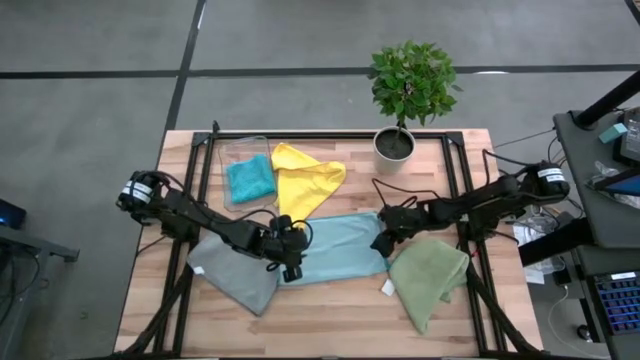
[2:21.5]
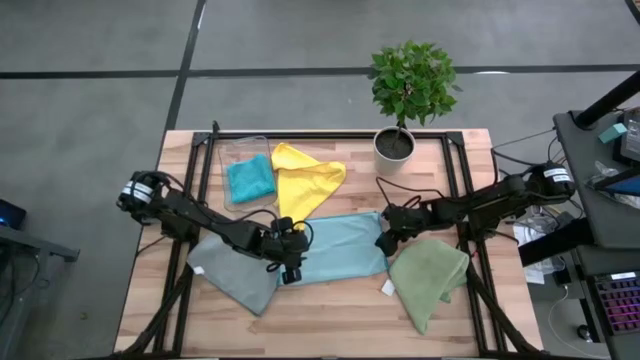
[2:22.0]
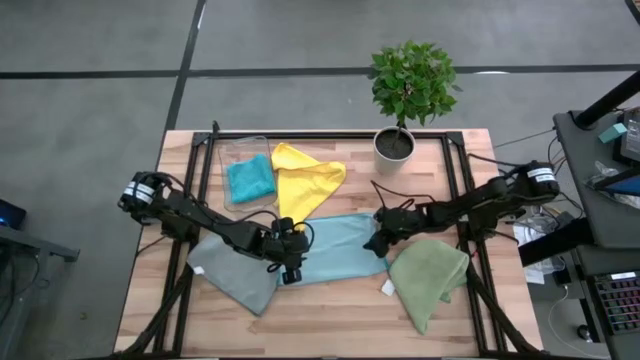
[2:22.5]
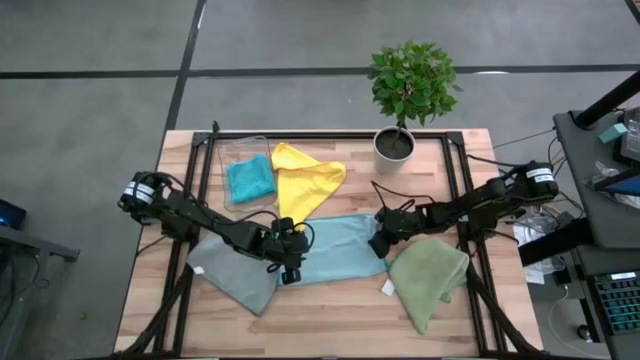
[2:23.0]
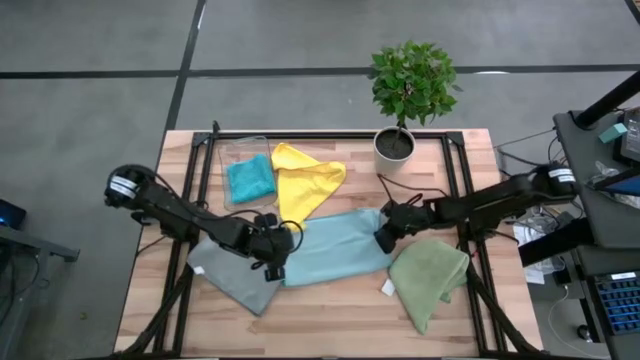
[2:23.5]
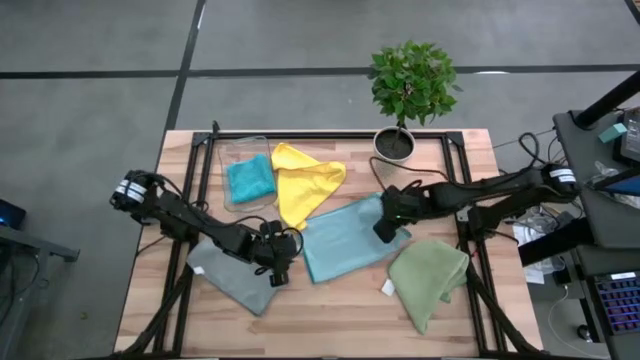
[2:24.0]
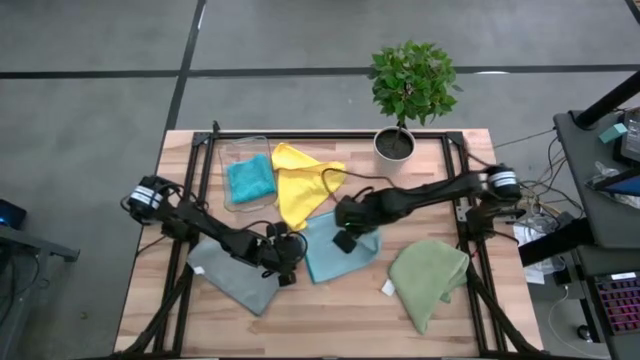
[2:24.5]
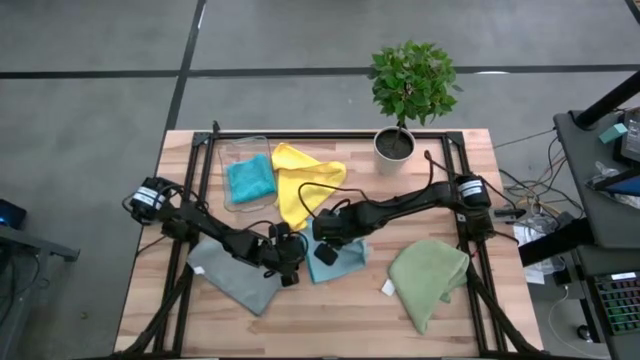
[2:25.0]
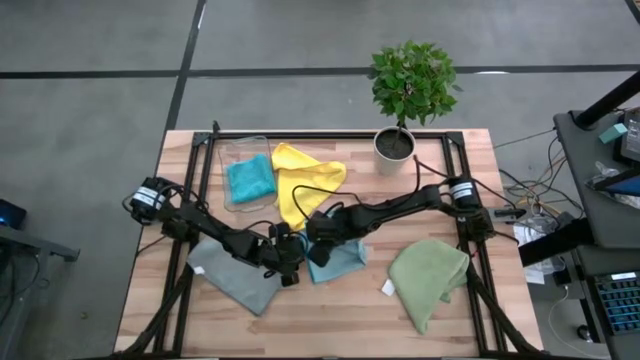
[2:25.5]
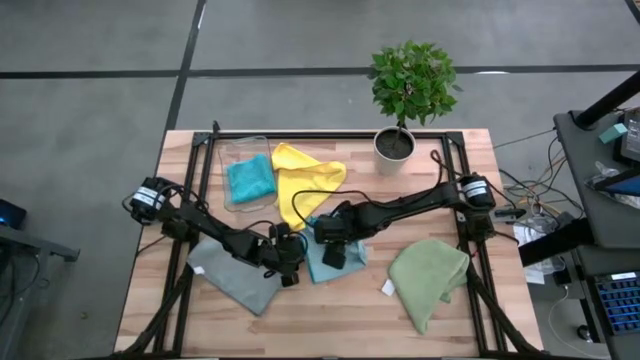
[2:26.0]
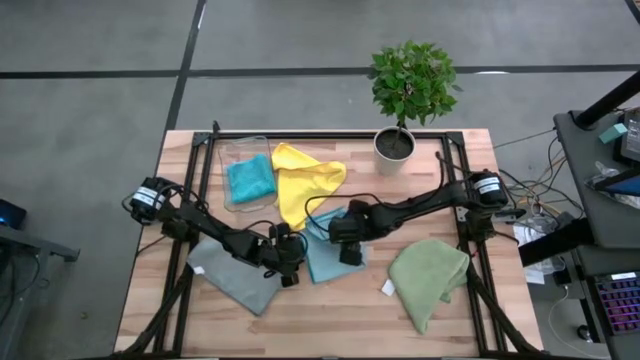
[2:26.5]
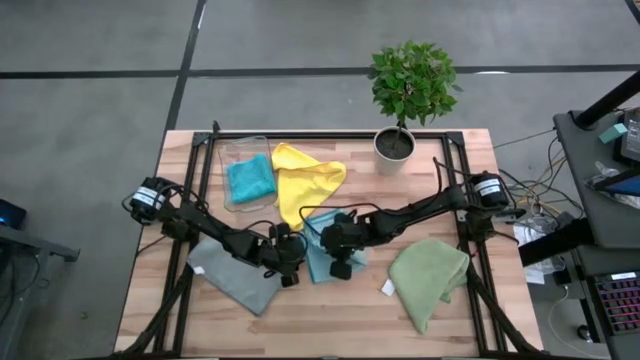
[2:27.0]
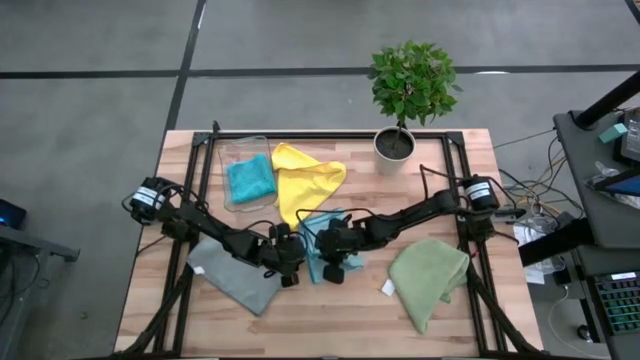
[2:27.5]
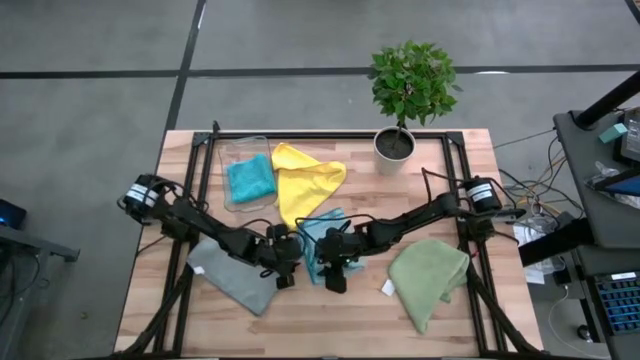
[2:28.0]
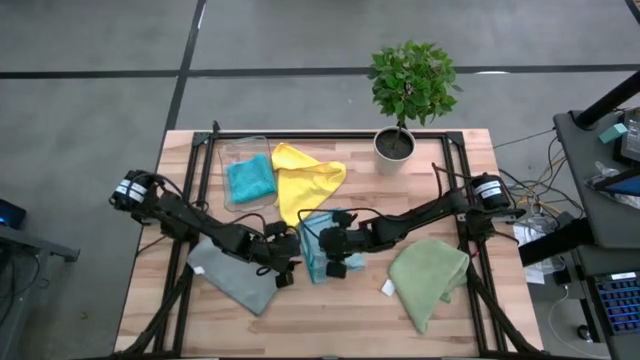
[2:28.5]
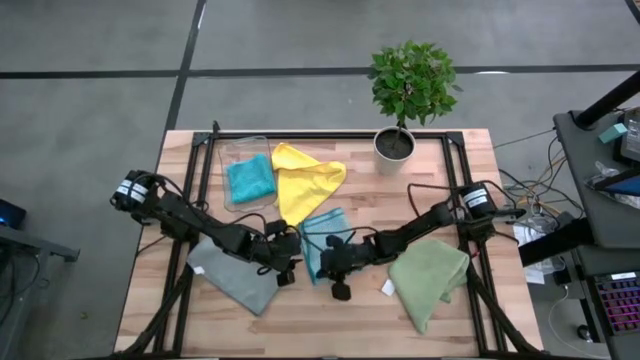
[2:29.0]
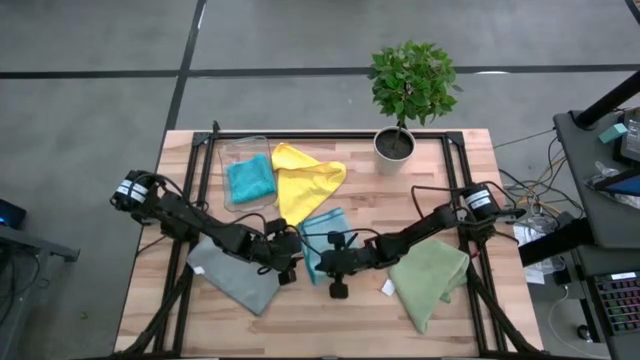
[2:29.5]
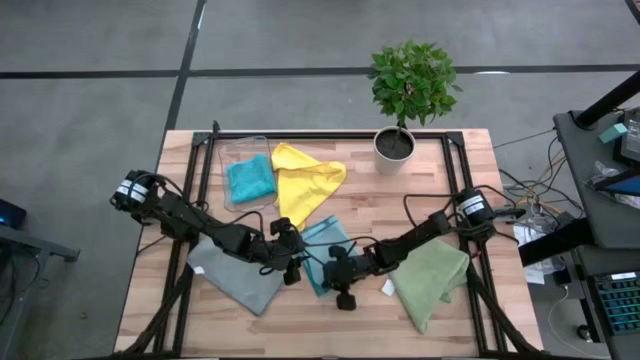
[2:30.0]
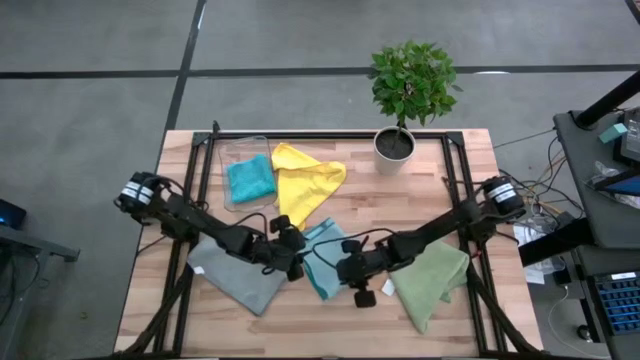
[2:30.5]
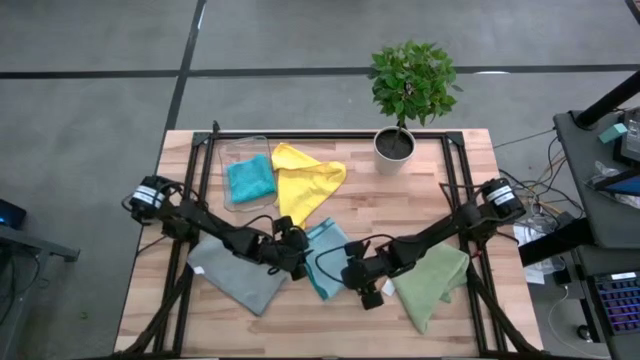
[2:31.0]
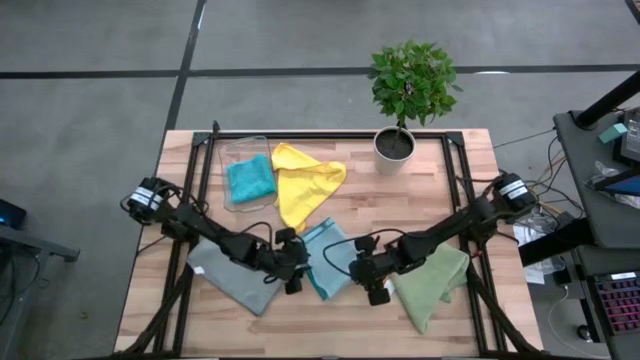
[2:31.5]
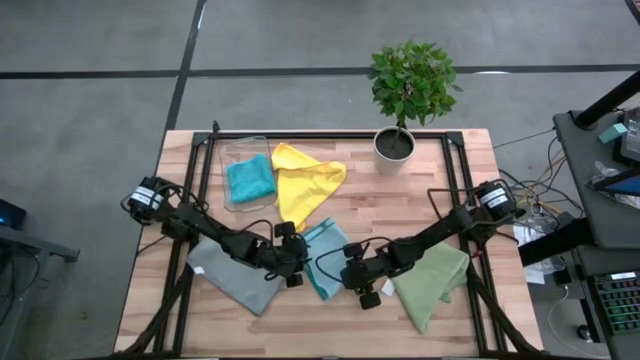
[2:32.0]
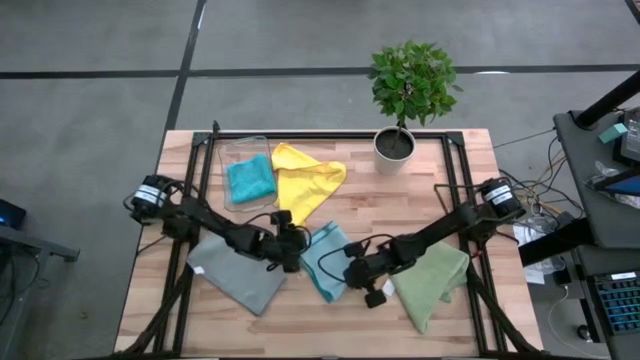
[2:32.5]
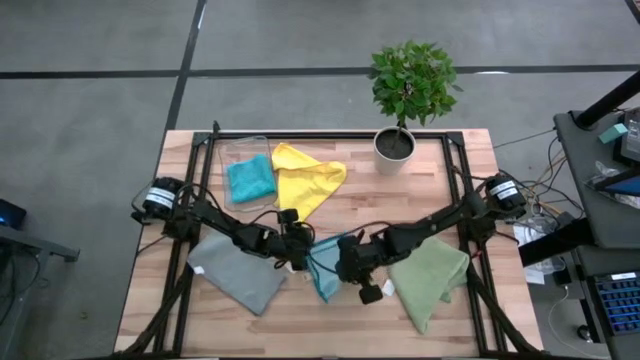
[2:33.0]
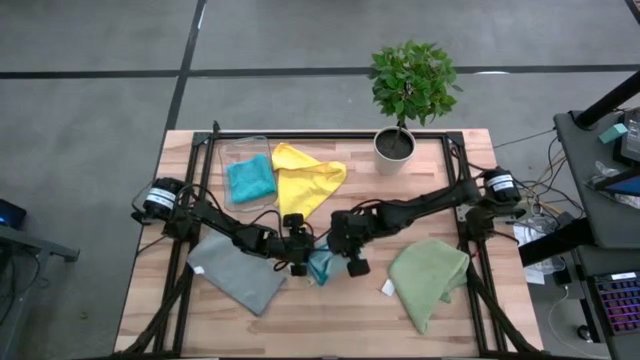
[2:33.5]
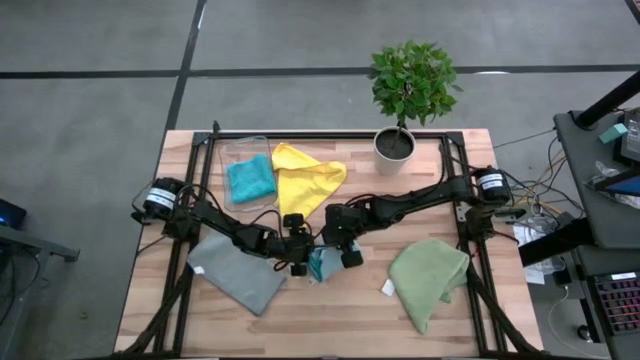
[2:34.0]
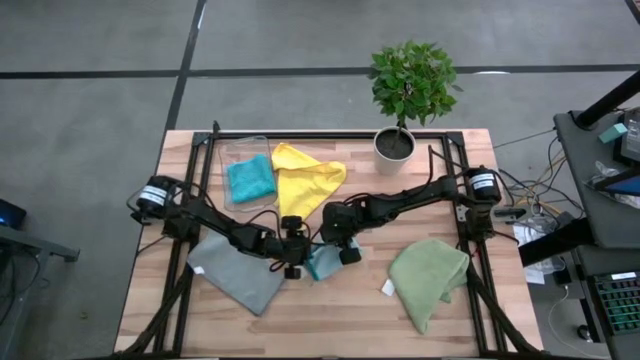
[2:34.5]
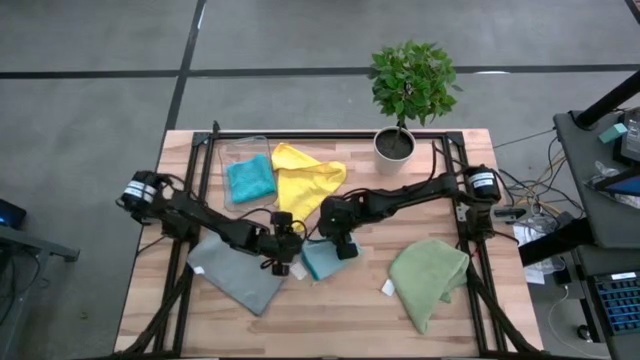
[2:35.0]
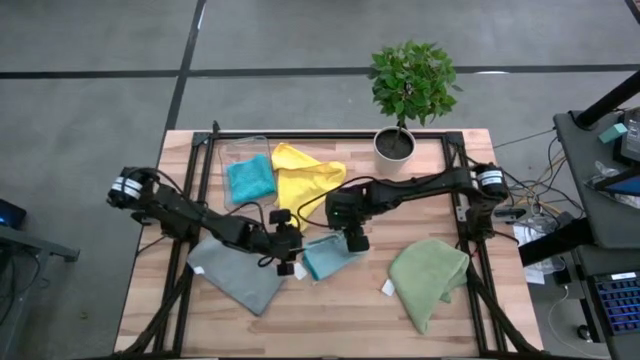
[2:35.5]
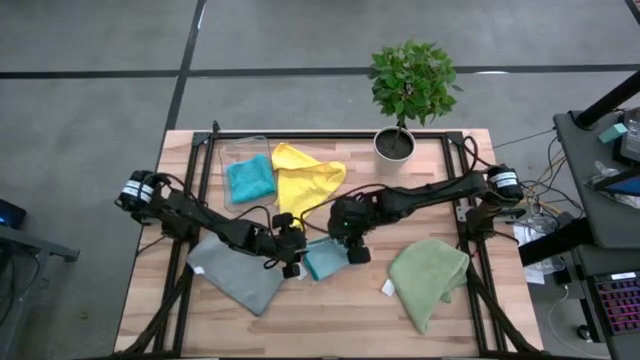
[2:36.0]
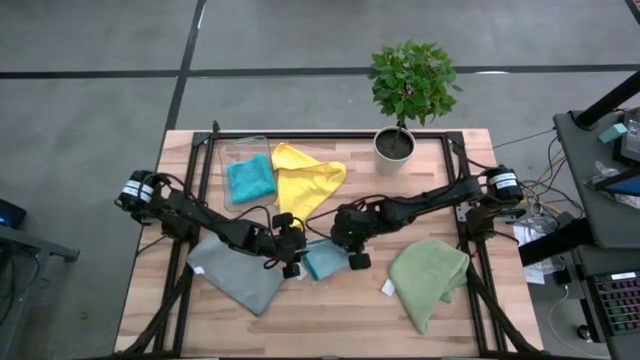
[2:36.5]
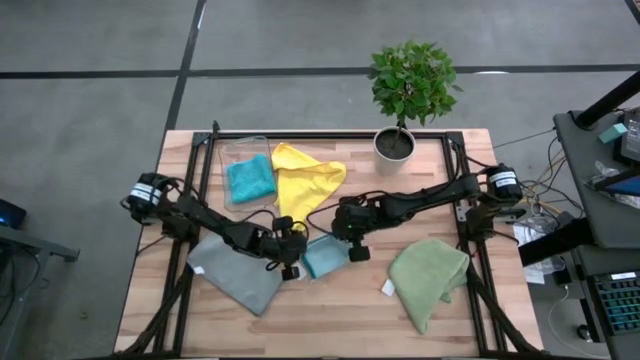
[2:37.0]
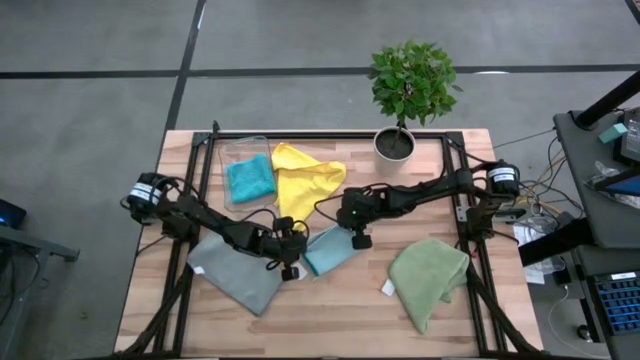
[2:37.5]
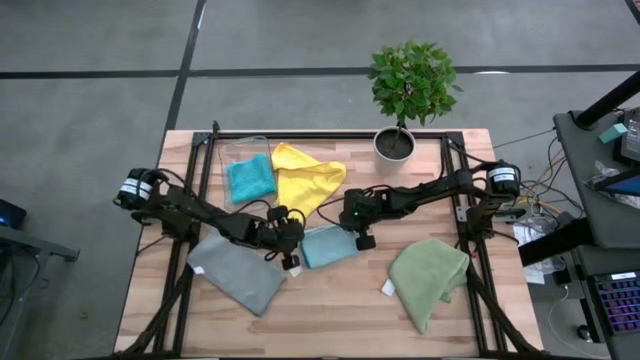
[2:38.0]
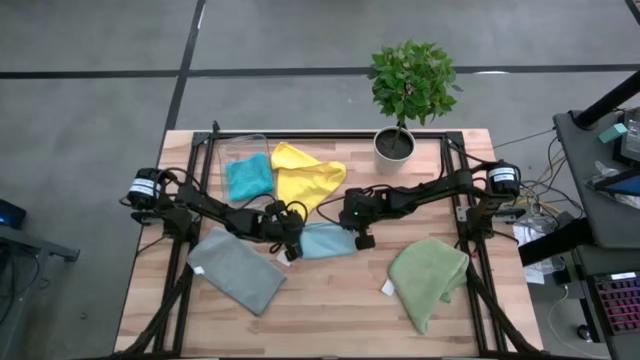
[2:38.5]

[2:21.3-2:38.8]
Task: Fold microfiber towels
Fold the light blue microfiber towel

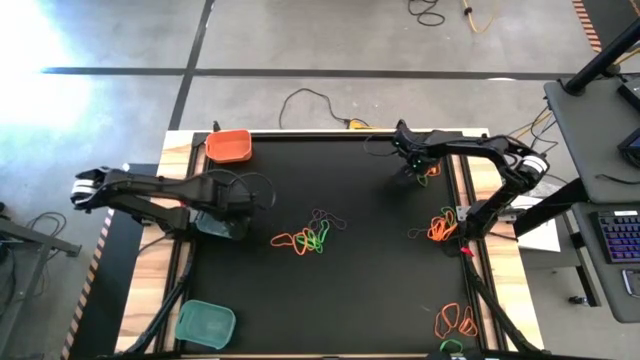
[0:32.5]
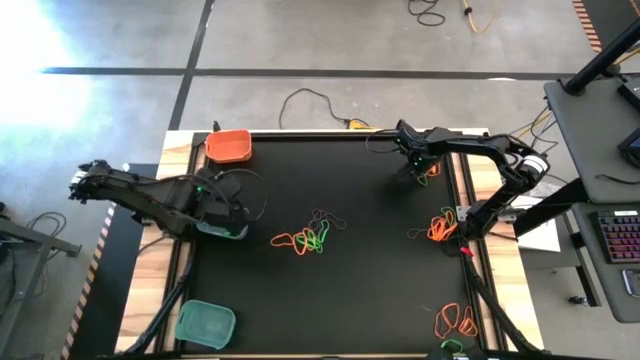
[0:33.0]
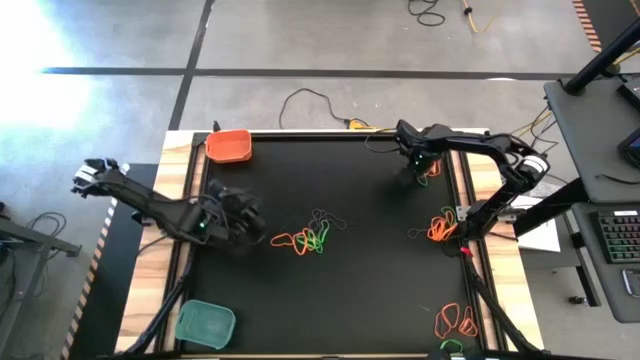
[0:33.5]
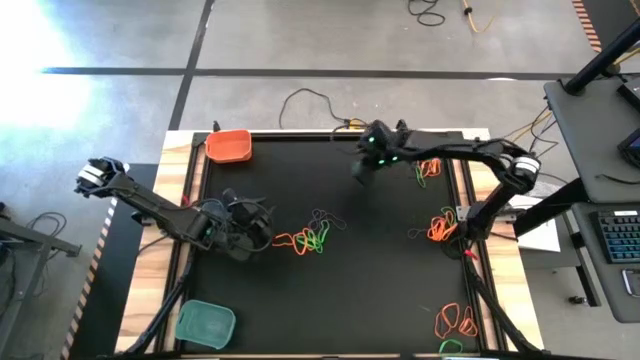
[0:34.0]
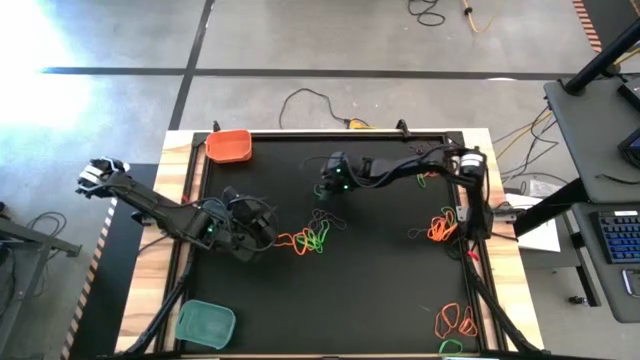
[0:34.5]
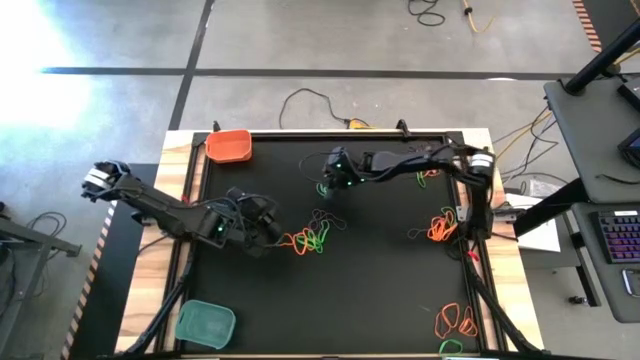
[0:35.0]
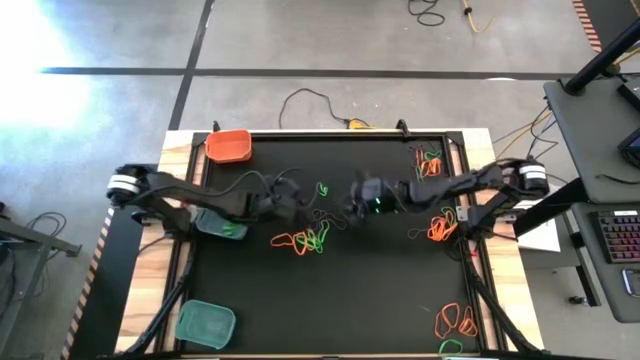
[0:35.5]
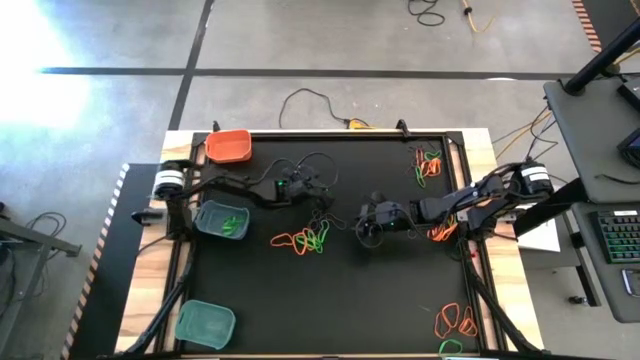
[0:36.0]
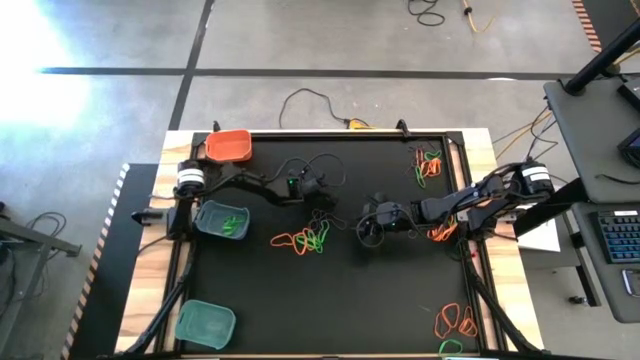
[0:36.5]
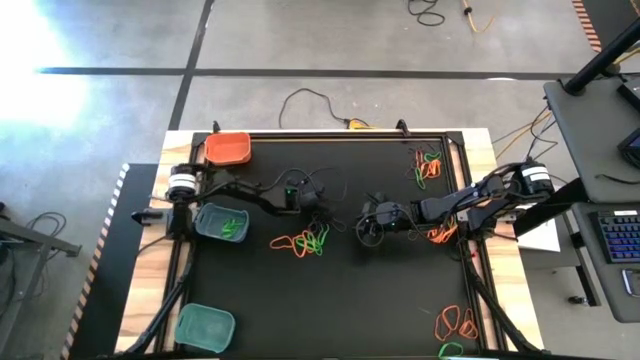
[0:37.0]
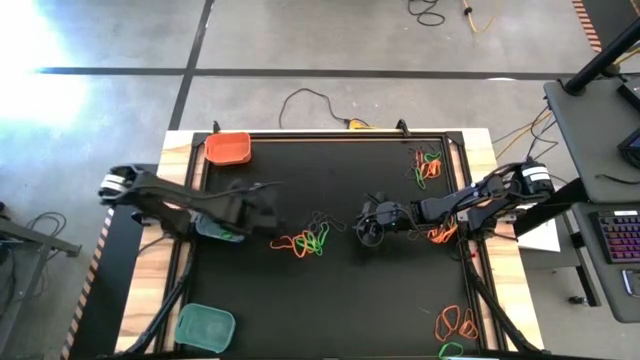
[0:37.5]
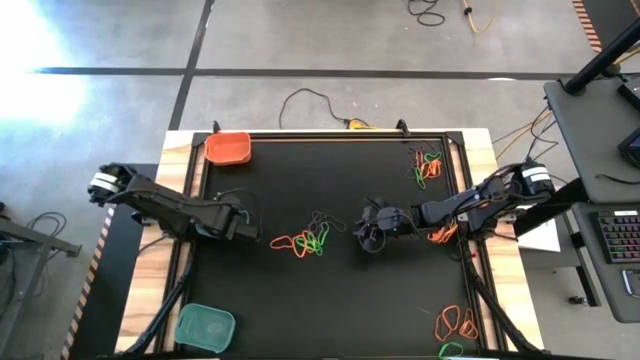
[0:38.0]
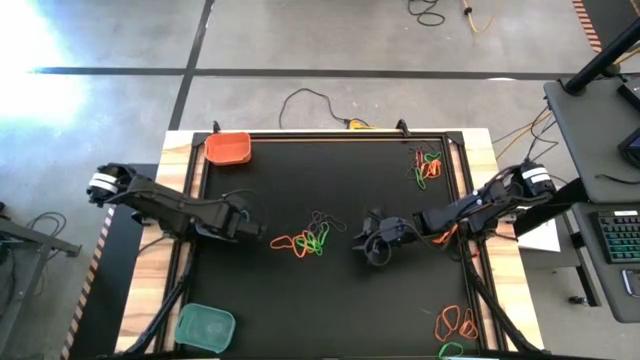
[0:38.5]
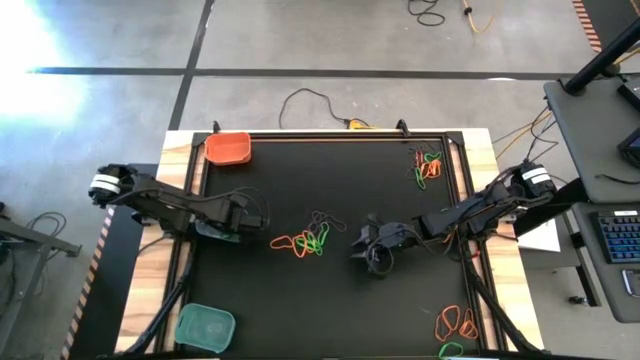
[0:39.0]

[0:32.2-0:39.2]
Task: Sort rubber bands into baskets
Put the green rubber band into the blue bin
